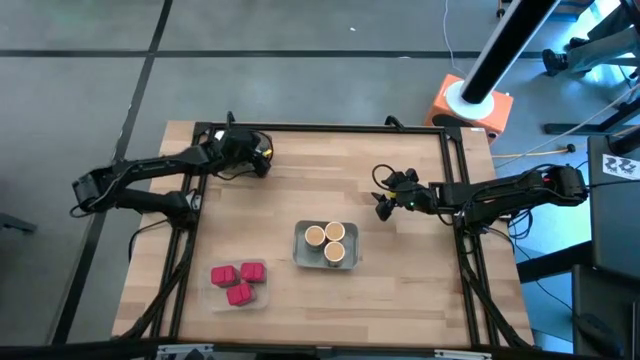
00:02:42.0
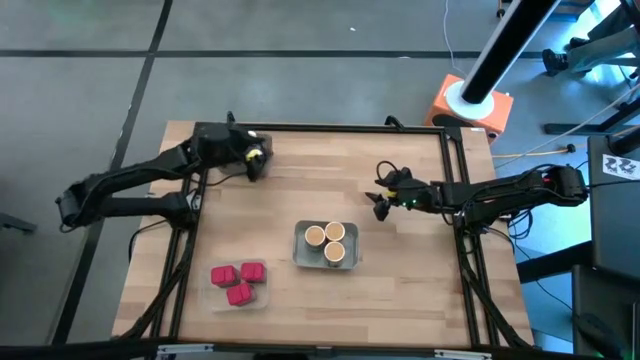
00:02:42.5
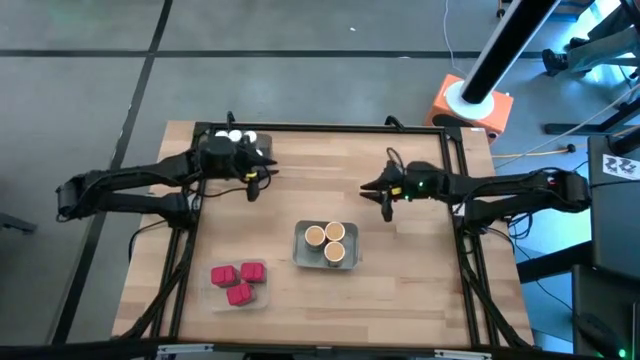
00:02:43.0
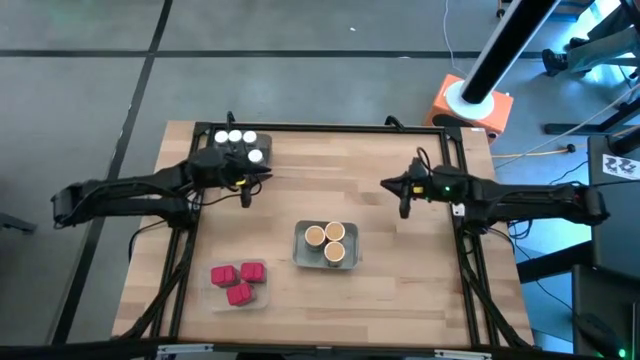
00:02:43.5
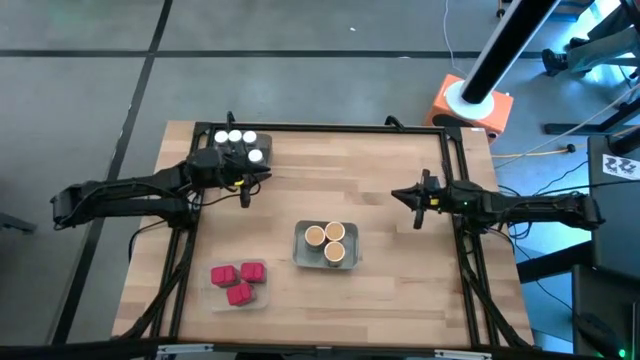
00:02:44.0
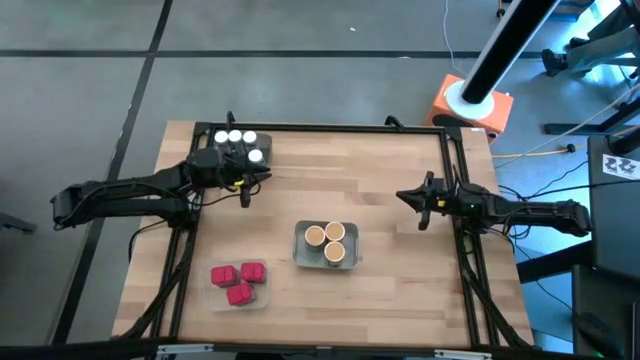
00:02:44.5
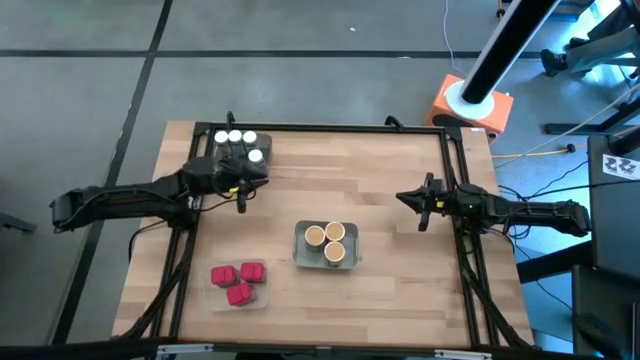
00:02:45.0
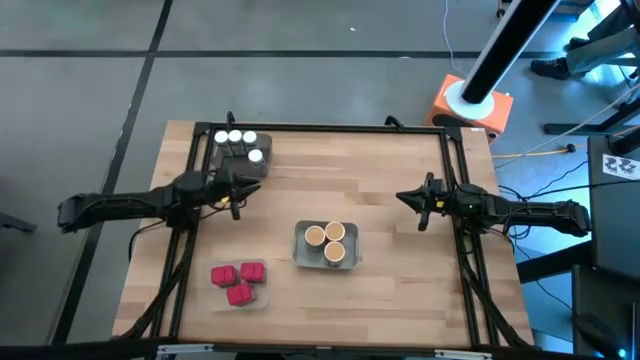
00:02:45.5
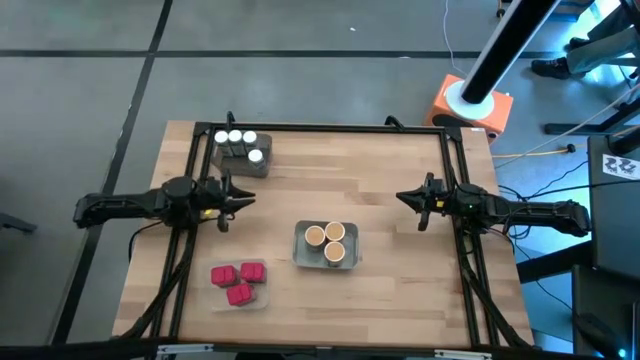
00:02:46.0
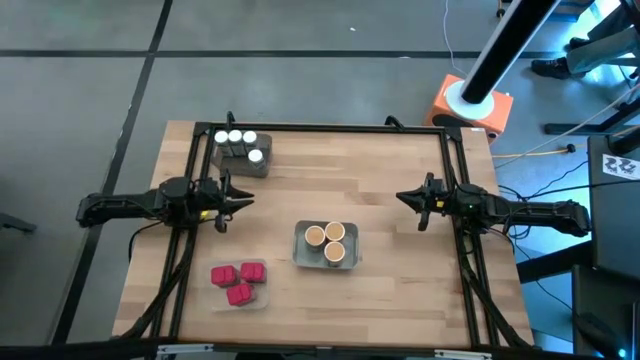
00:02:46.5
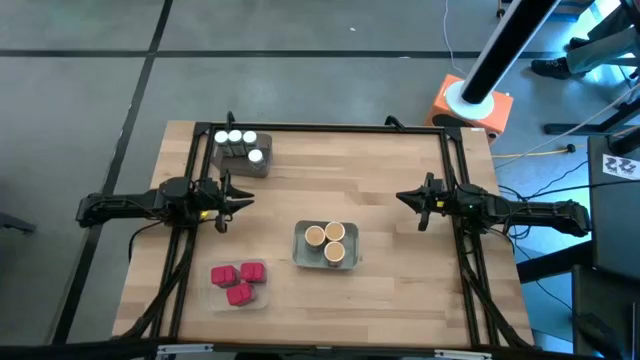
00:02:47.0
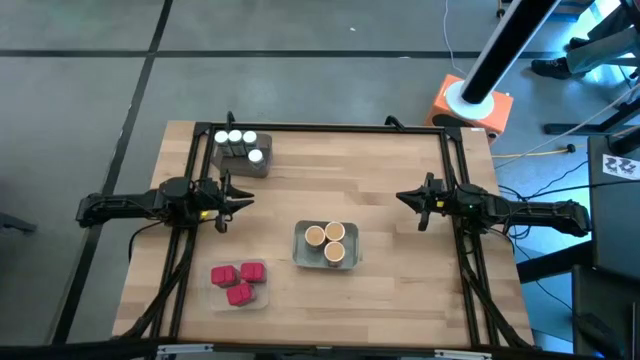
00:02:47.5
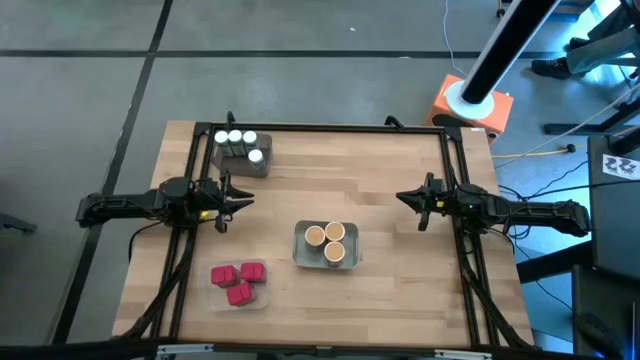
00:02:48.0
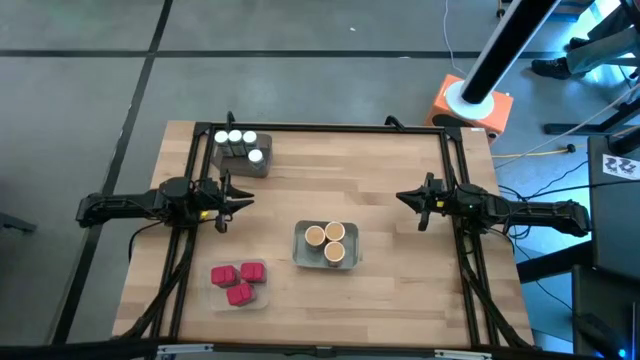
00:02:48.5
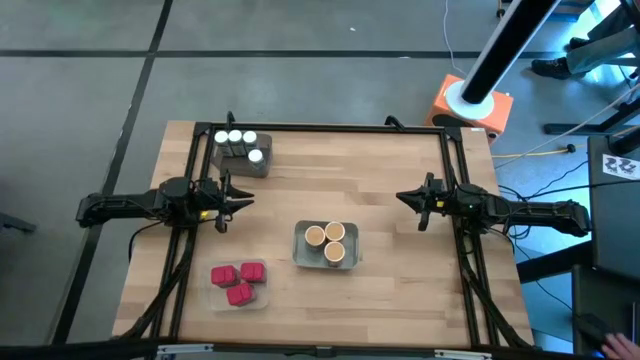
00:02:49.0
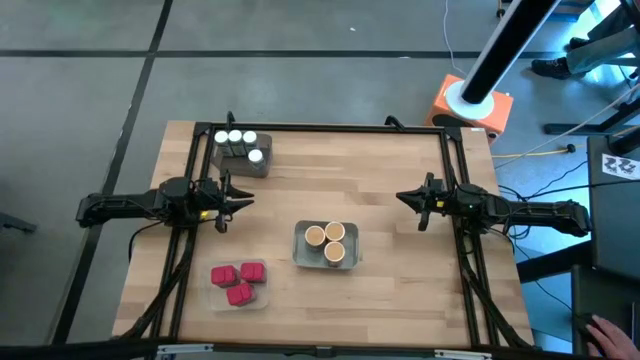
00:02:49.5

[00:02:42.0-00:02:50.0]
Task: Sort spices by type
Return to Home Position

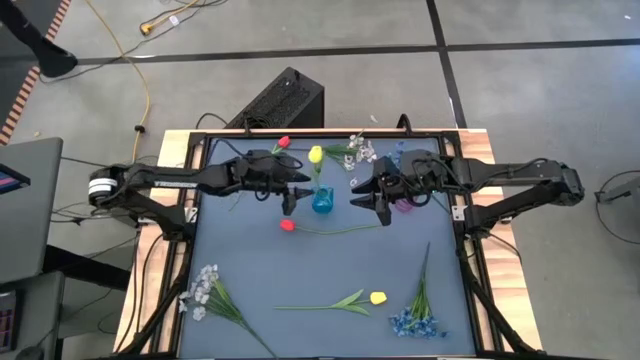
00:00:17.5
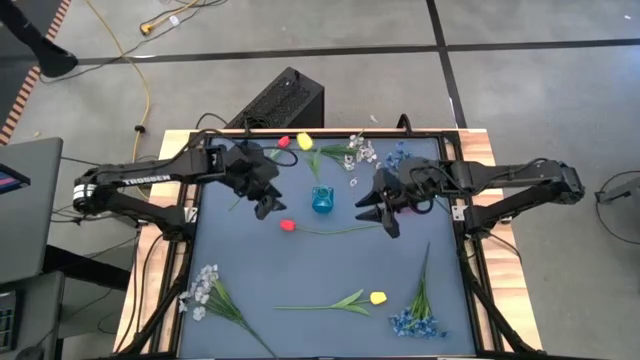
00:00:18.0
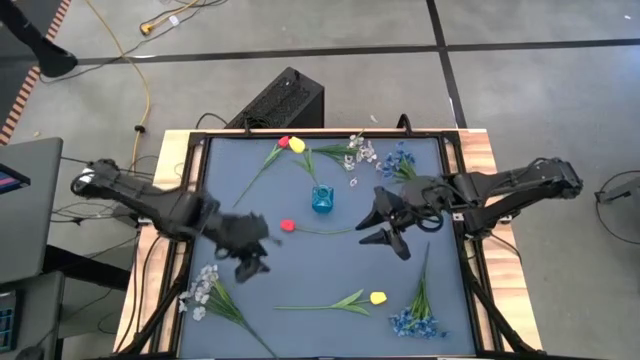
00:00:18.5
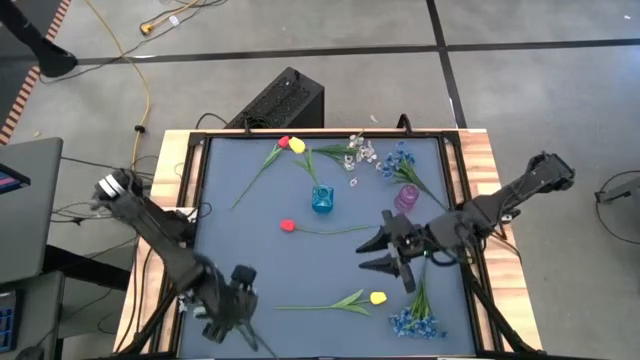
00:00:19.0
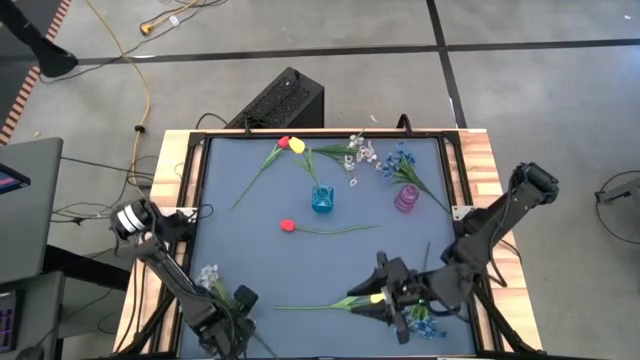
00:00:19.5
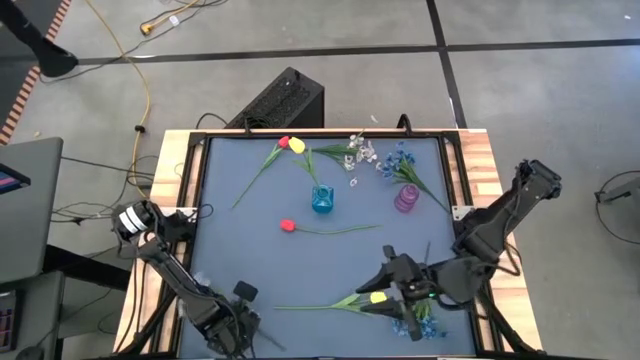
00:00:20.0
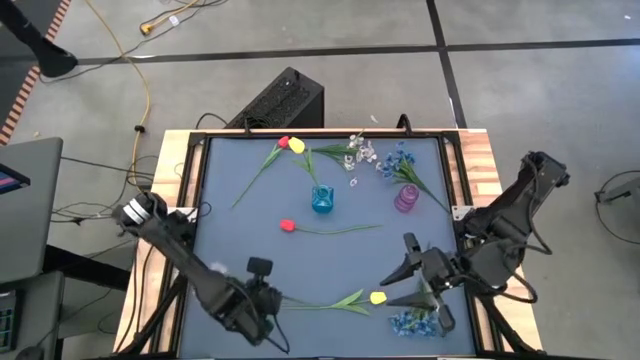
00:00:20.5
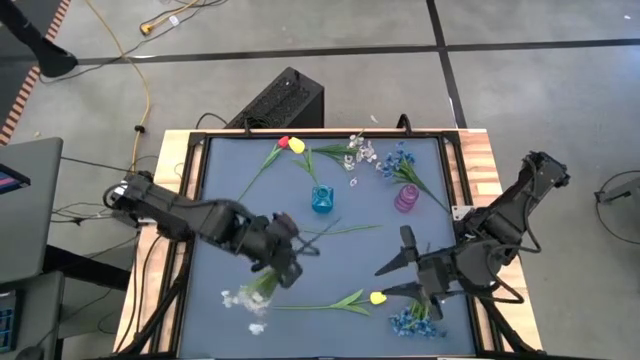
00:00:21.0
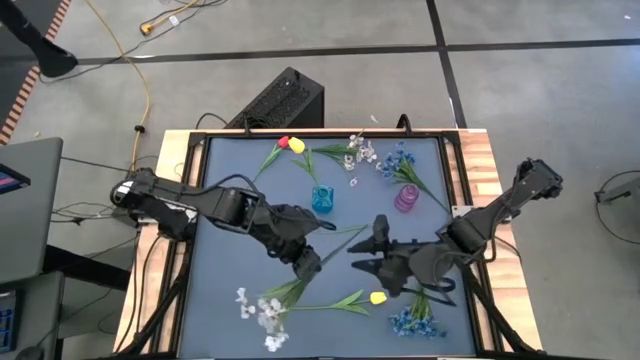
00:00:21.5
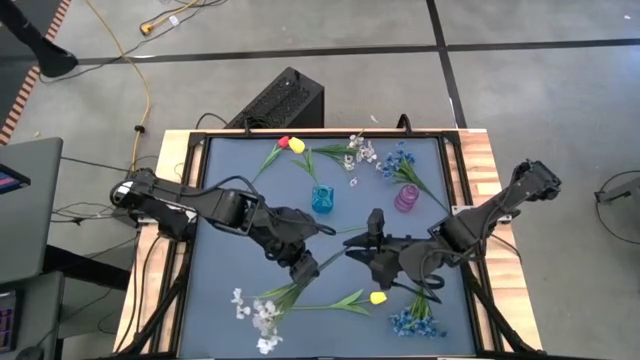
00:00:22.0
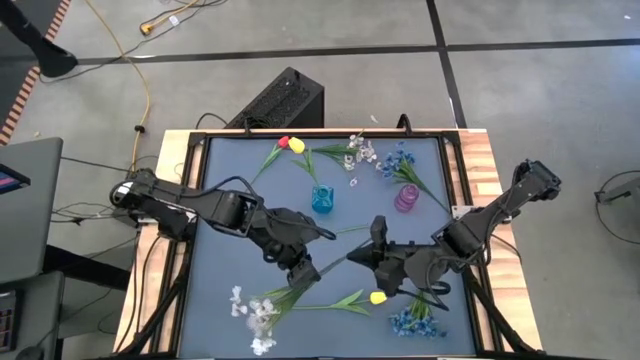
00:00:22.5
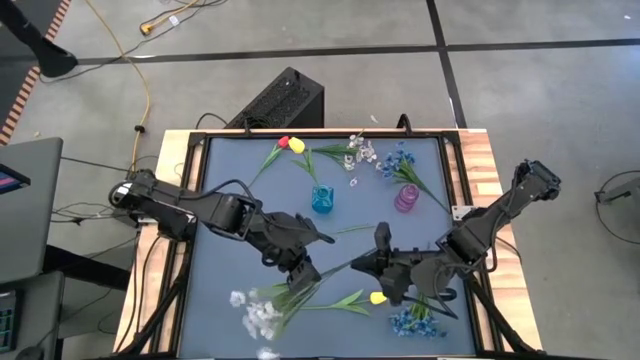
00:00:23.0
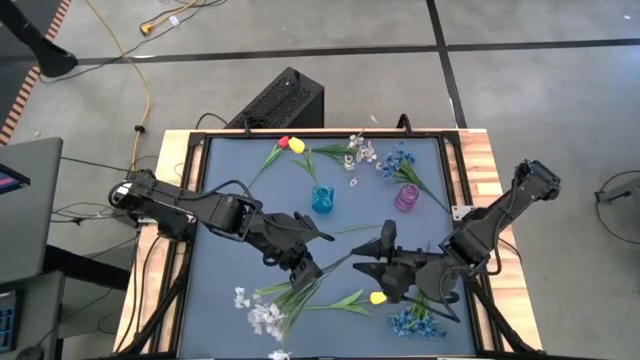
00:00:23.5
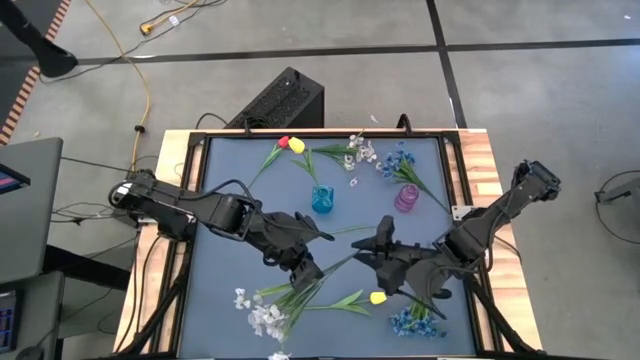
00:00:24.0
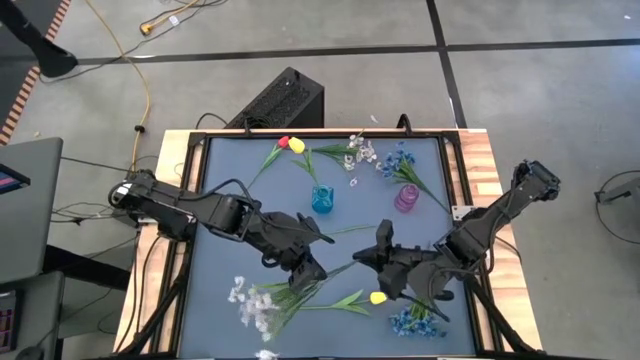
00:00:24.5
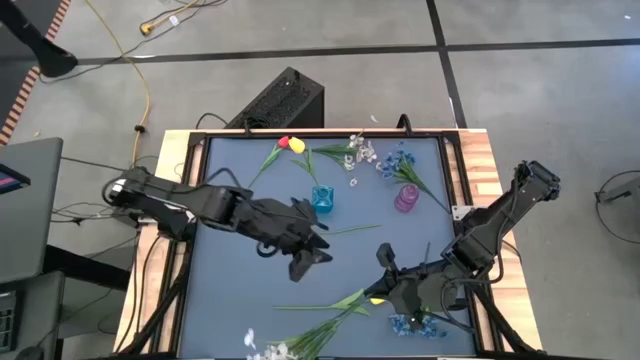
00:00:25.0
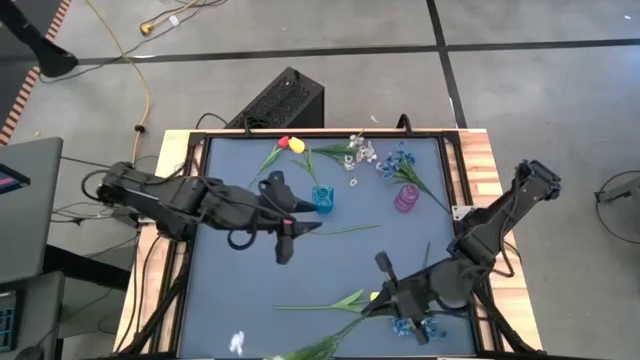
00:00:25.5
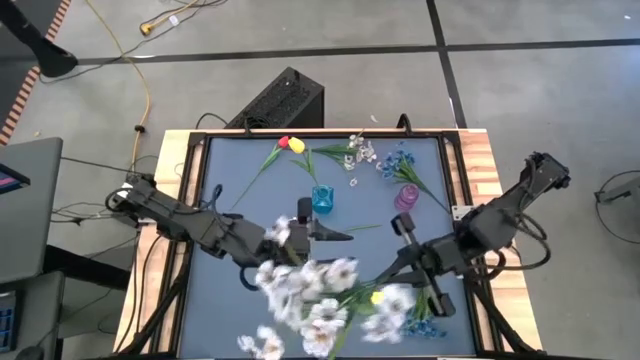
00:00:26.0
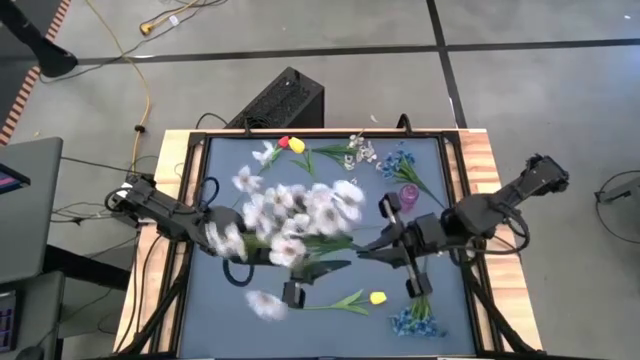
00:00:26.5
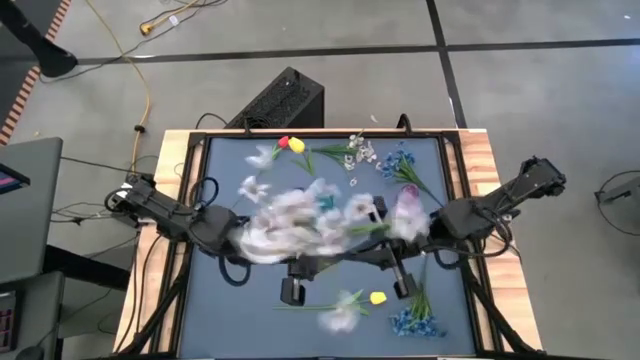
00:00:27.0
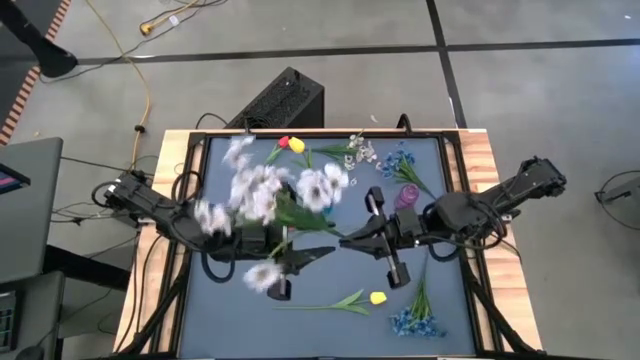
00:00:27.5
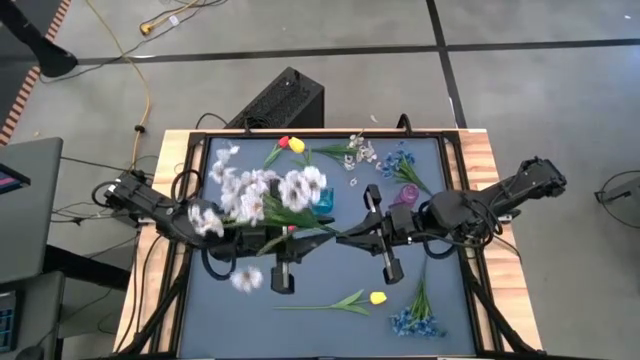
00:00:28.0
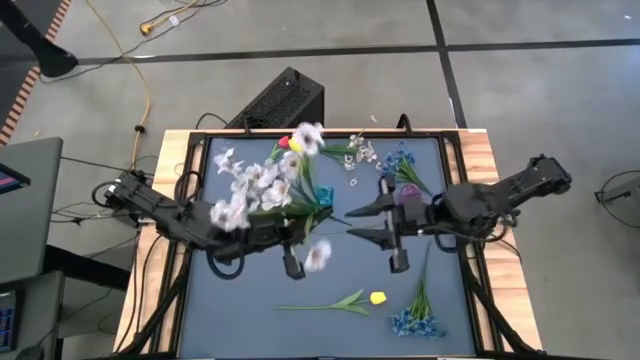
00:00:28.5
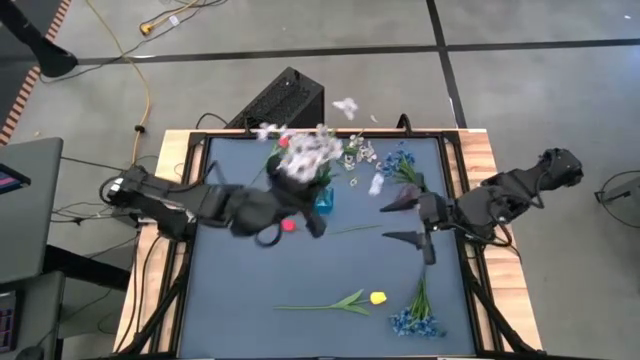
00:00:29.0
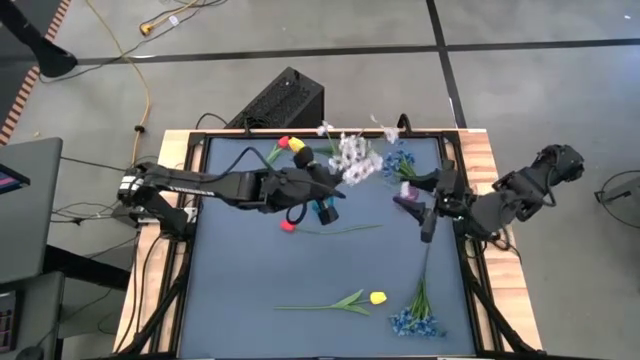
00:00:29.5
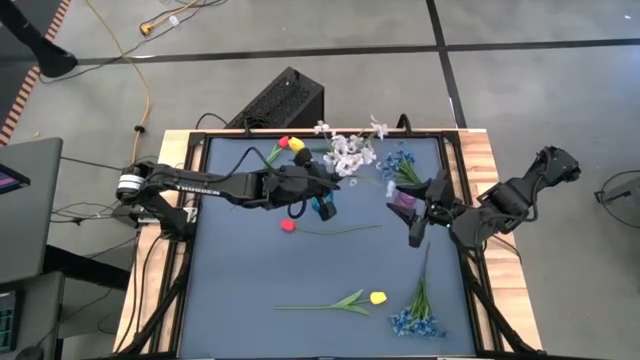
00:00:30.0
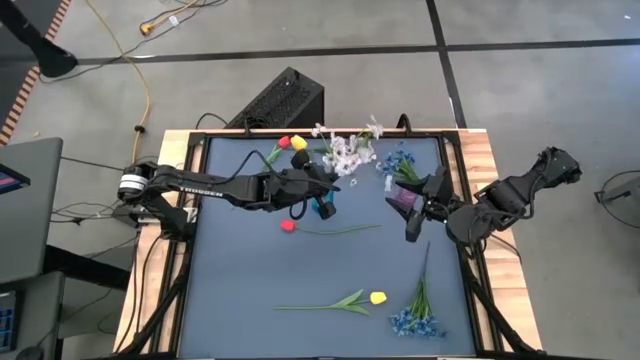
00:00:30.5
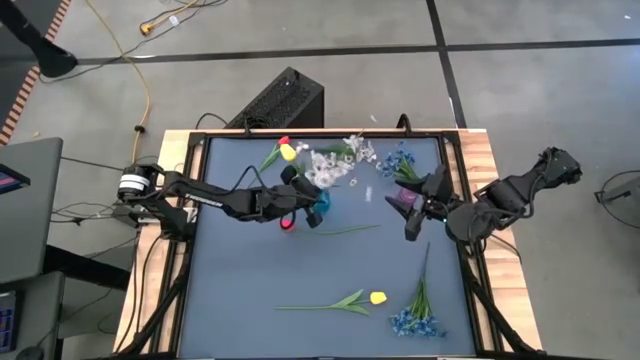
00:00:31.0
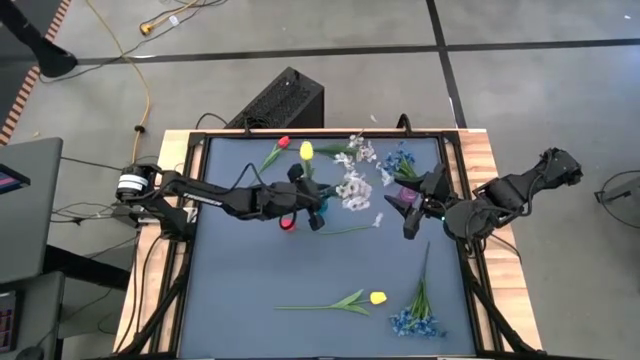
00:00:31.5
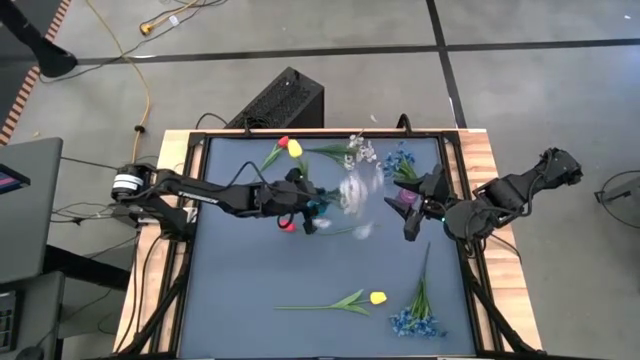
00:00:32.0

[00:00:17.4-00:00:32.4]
Task: Sort flowers into vase by color
Put the bottom white flowers into the blue vase
